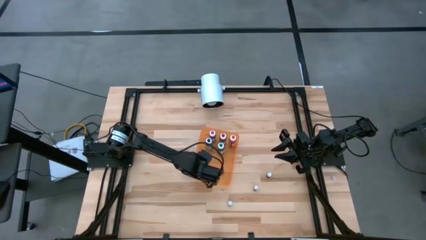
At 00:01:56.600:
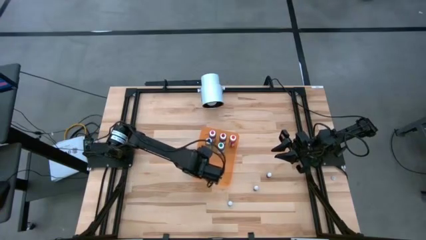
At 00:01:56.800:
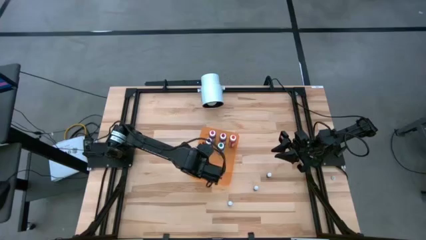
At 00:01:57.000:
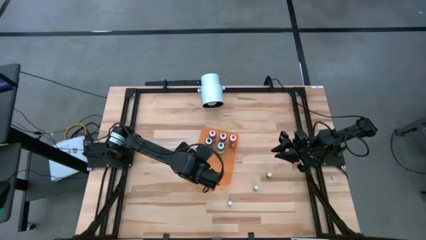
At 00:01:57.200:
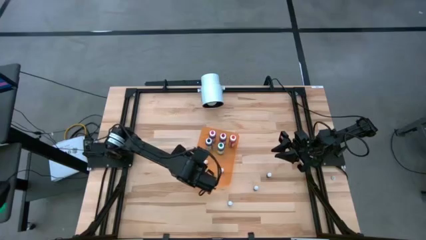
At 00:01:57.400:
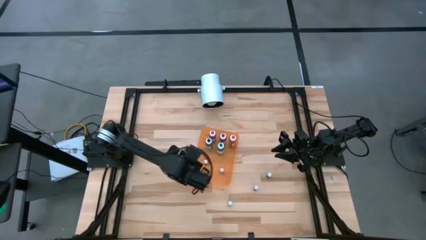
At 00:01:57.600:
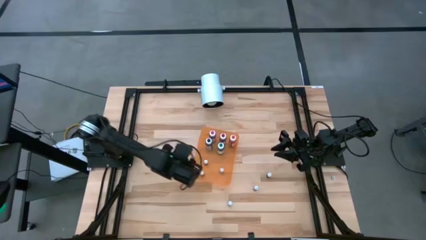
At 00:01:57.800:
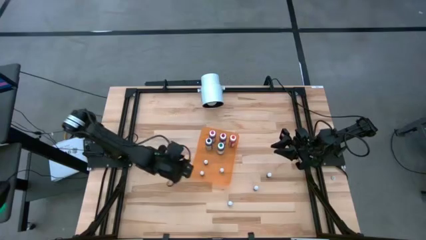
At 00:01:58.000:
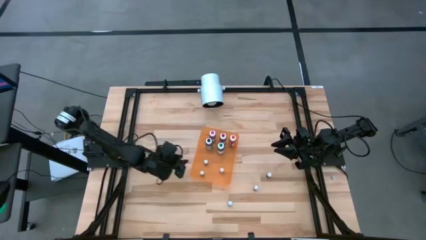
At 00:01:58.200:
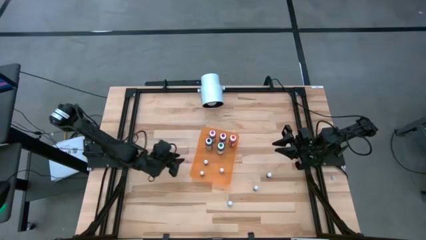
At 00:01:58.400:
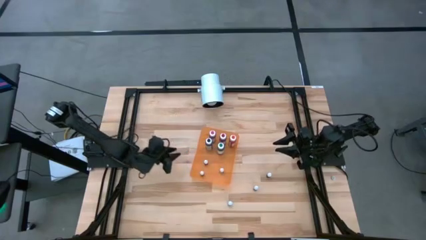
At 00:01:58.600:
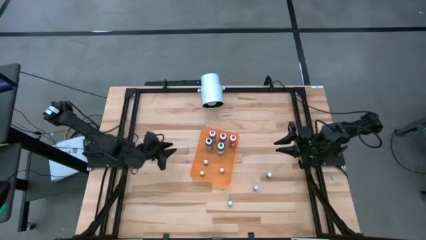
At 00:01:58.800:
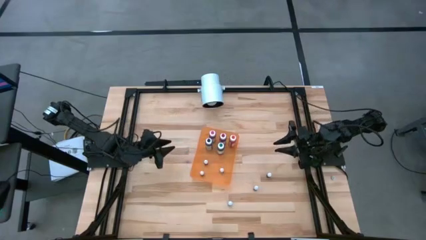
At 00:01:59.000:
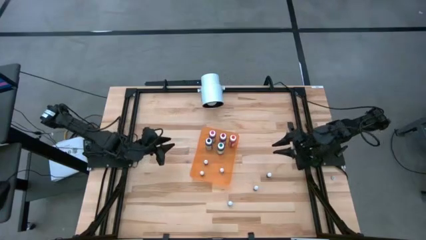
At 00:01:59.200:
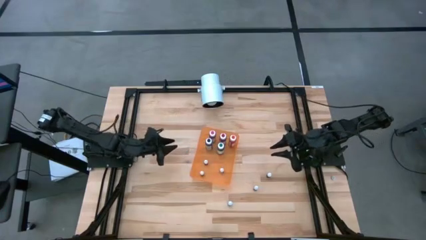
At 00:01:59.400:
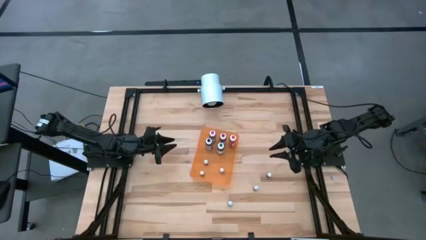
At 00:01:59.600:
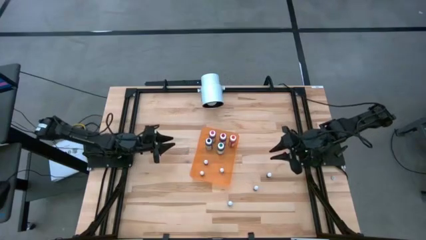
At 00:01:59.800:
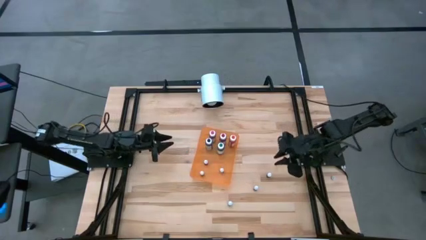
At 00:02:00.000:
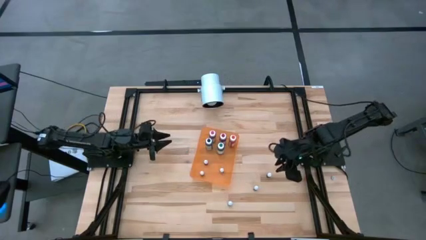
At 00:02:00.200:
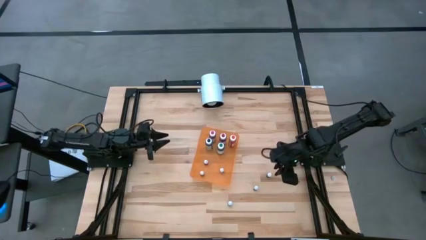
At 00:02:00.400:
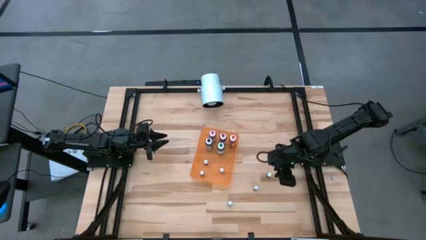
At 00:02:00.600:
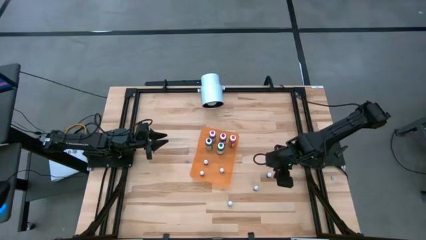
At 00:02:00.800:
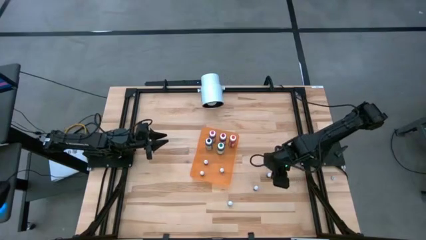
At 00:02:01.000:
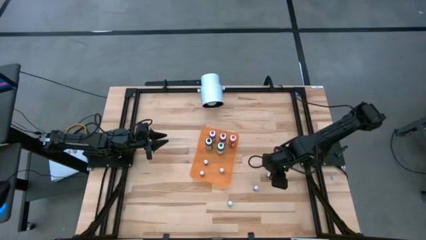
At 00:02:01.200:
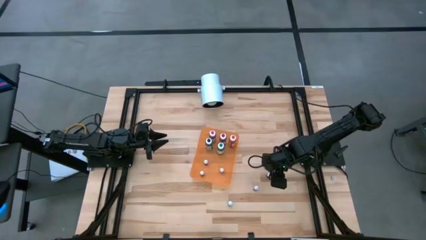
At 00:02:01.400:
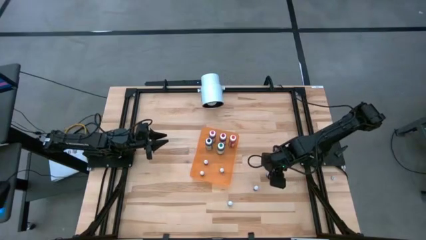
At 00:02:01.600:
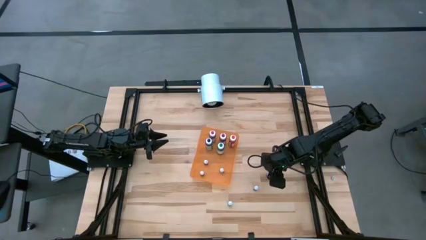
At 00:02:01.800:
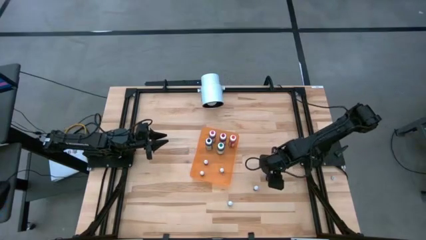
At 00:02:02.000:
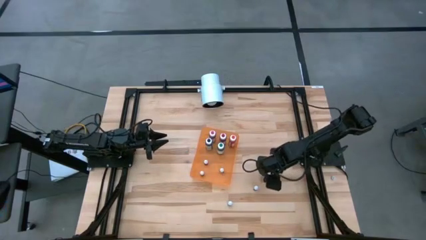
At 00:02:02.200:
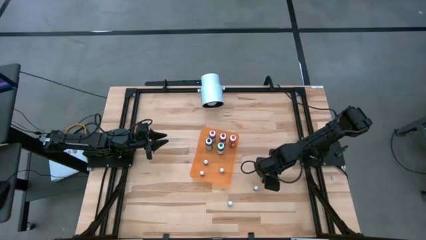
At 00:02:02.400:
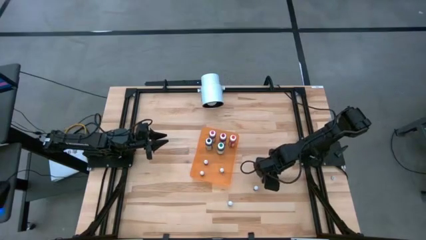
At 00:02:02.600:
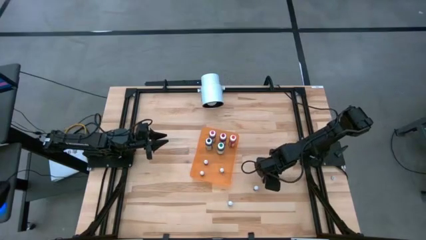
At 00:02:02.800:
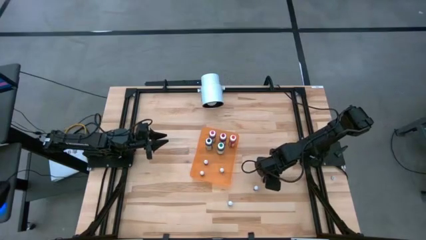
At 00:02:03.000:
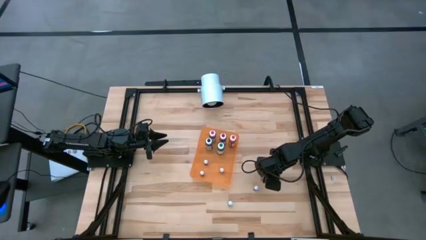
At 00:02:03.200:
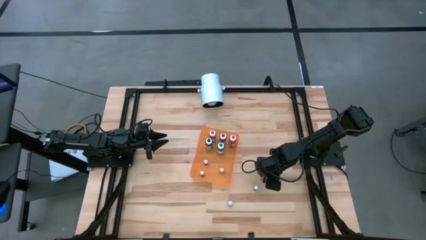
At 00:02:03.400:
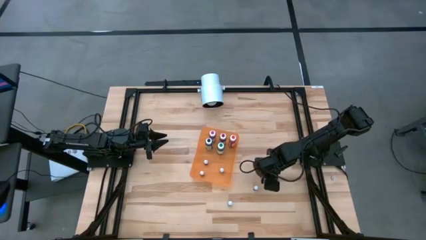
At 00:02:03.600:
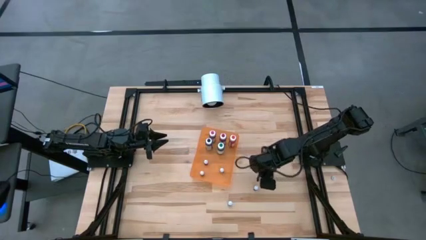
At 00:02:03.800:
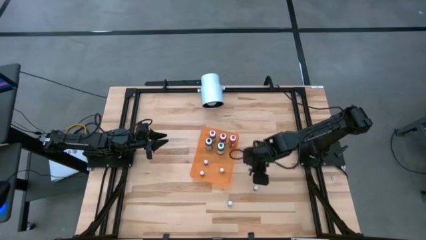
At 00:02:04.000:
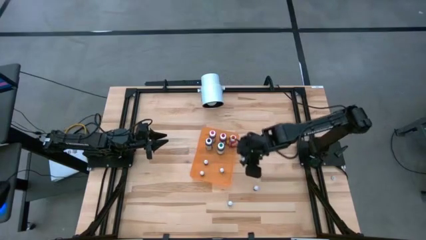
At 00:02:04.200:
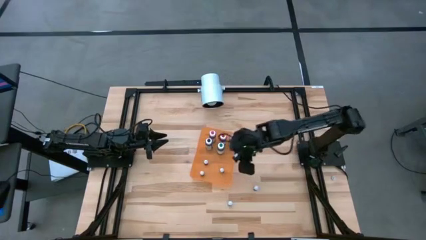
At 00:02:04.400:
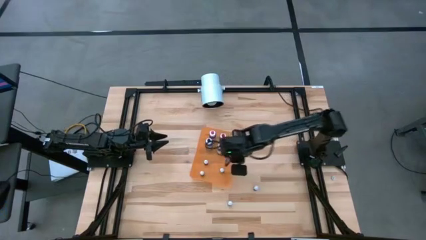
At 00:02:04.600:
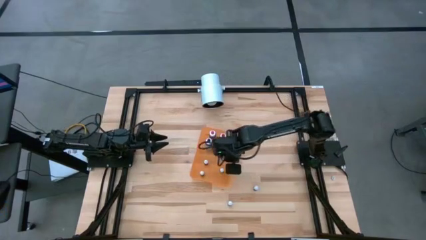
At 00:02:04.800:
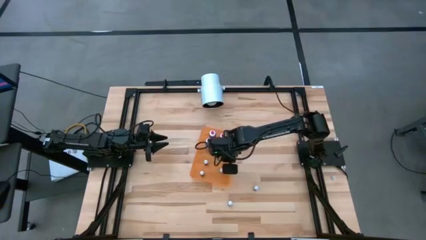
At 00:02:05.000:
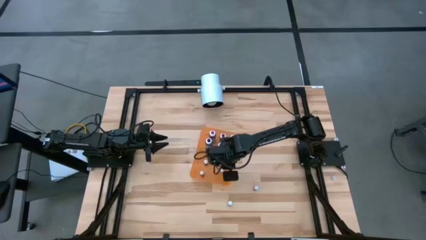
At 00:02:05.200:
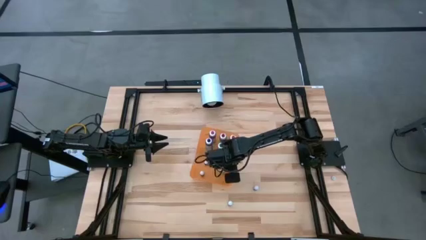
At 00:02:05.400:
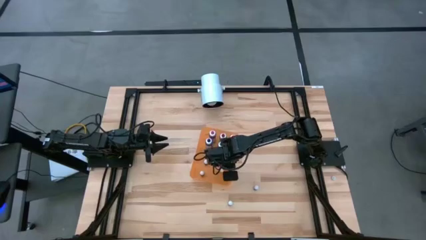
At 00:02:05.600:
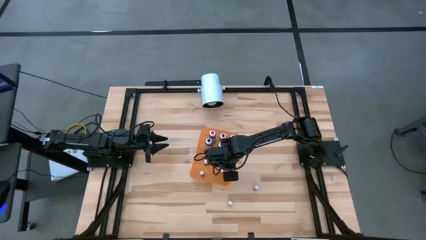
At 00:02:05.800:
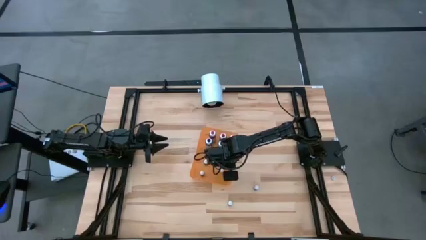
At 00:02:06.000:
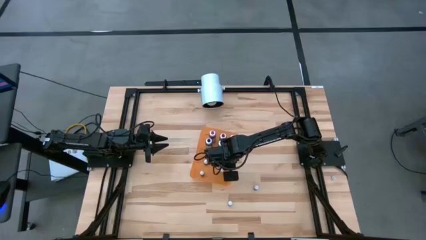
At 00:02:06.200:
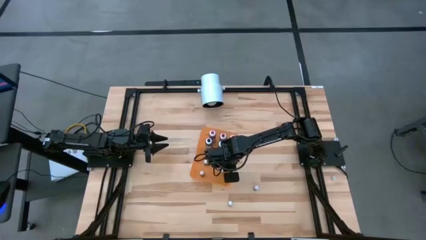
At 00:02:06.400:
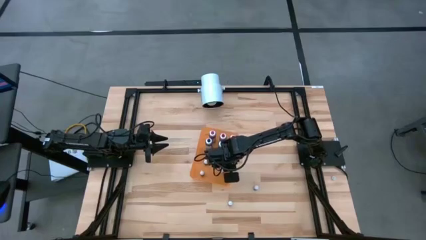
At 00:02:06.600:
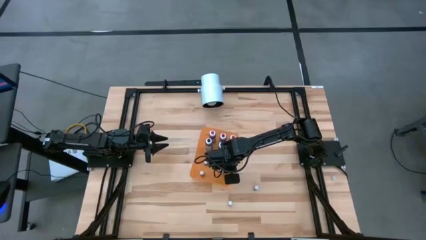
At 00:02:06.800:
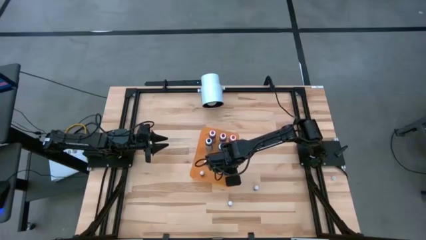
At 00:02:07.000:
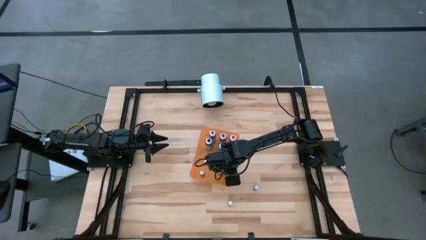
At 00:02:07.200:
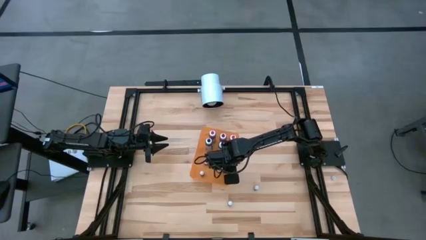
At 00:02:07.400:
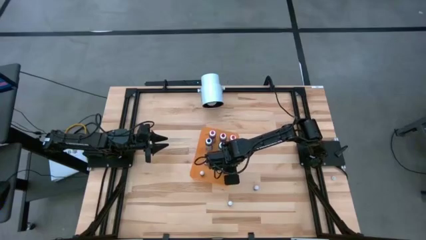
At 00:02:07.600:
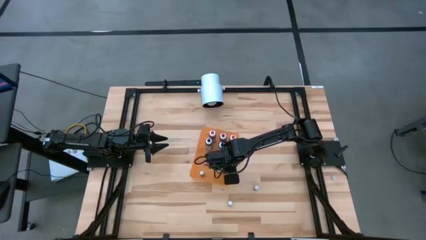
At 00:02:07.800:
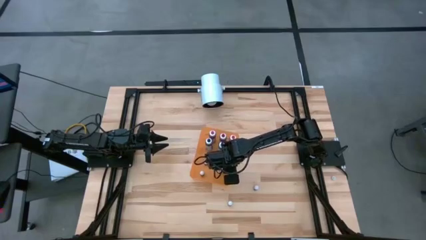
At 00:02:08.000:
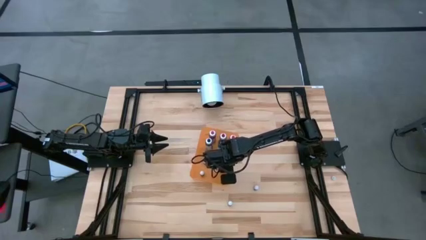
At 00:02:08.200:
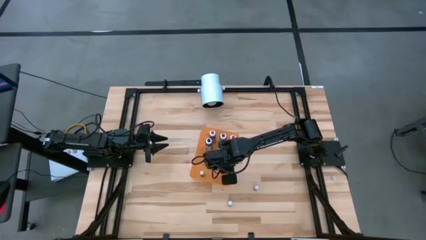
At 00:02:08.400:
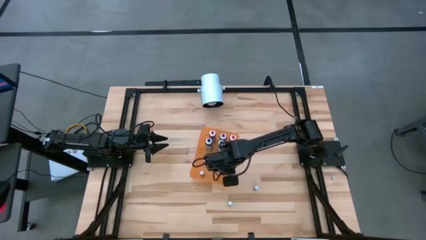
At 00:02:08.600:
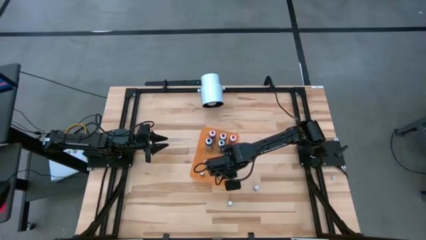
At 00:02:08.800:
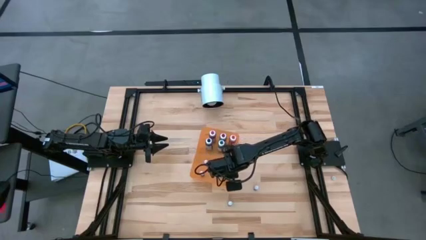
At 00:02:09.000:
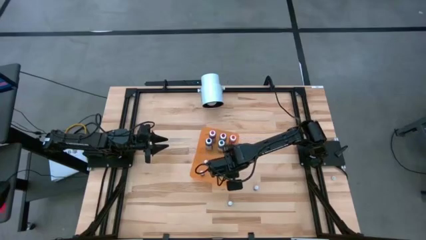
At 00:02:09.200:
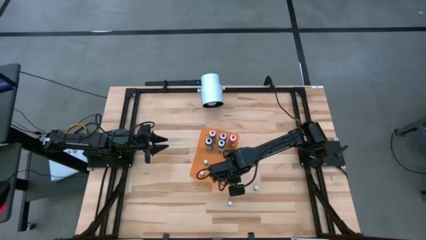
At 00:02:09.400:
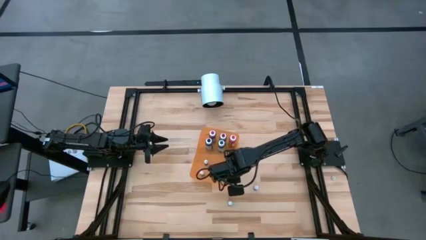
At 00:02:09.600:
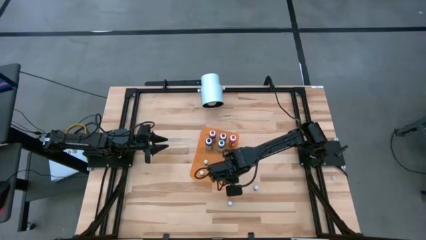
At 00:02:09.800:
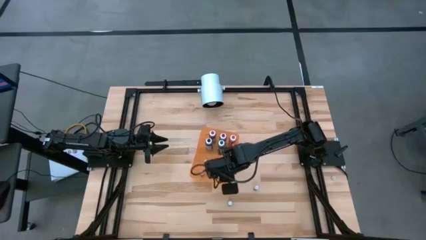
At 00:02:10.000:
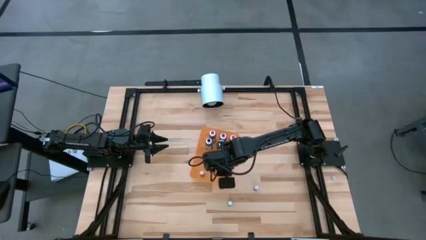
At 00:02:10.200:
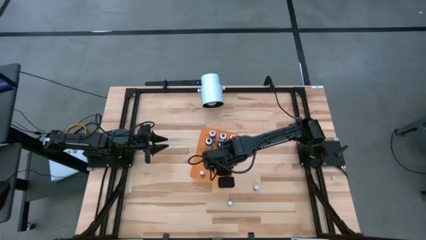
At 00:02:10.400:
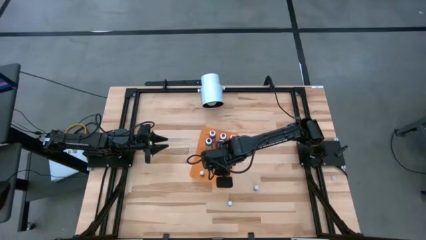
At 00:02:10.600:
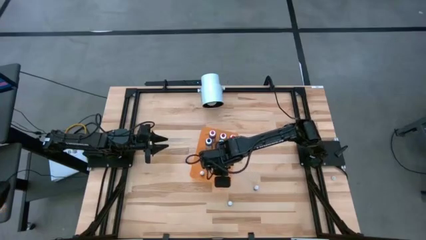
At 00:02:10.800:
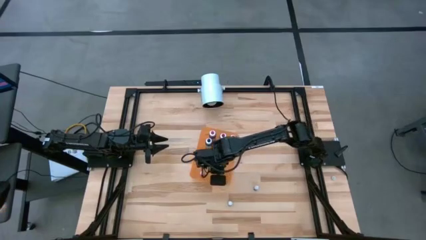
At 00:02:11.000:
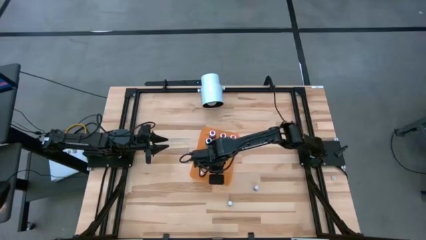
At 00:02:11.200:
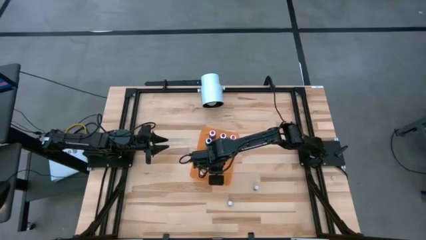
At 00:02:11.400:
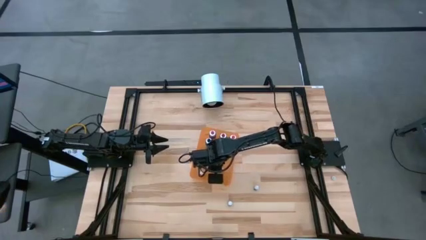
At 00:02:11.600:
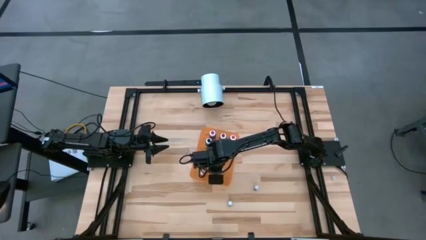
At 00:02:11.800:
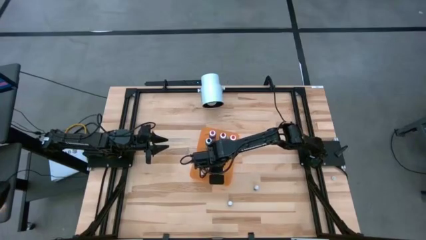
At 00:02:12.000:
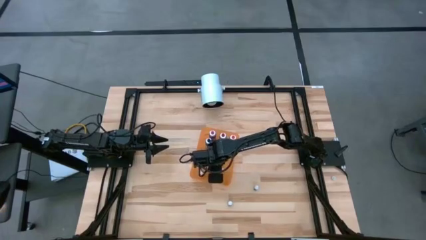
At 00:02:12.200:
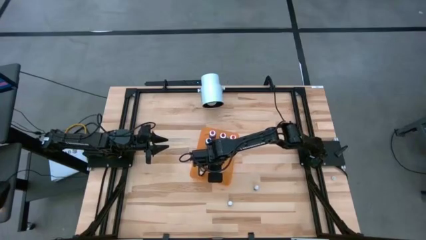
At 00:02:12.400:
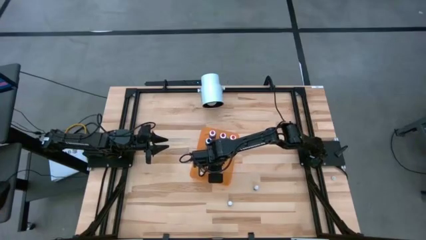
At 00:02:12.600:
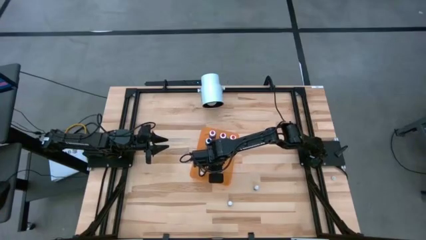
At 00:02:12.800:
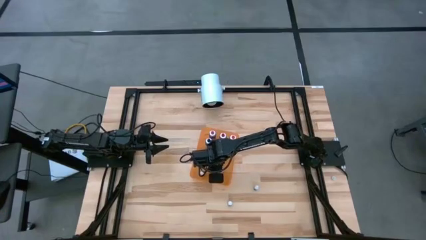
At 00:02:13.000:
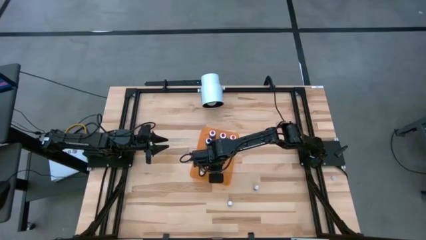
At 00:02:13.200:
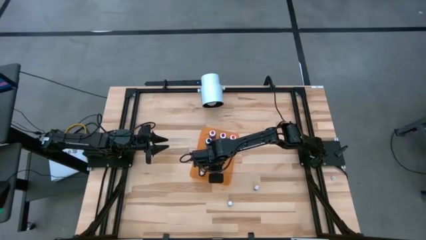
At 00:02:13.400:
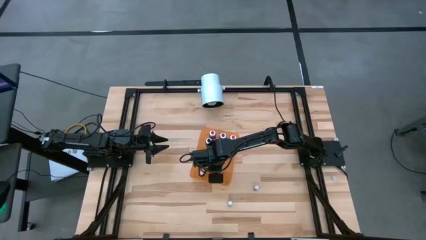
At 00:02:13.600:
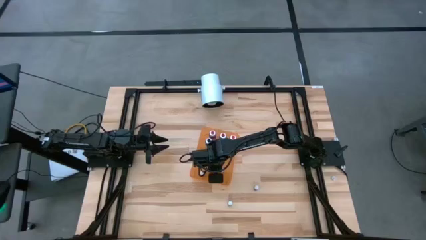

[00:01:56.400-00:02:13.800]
Task: Pick & Place food coloring
Put the small red food coloring bottle into the orange bin
